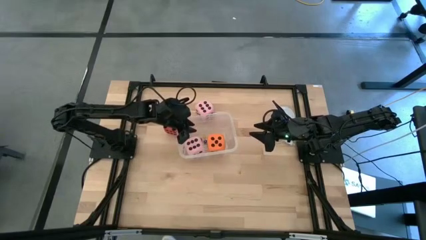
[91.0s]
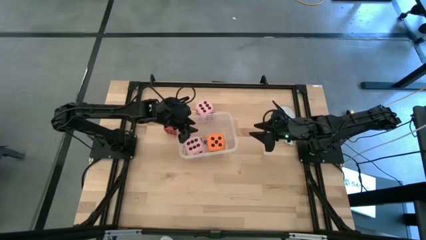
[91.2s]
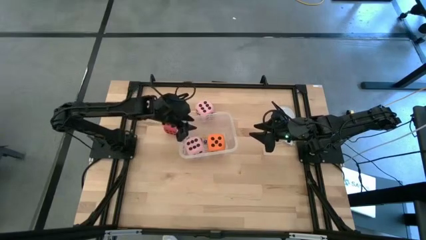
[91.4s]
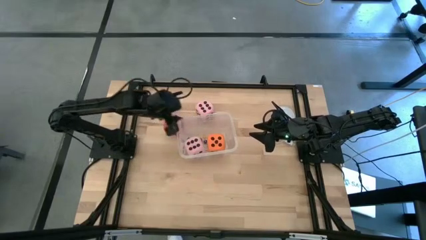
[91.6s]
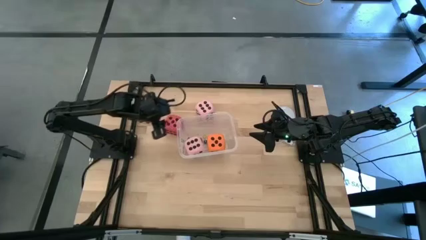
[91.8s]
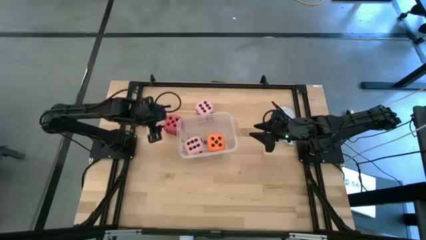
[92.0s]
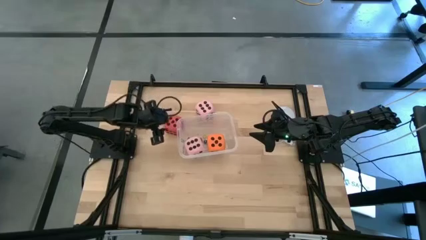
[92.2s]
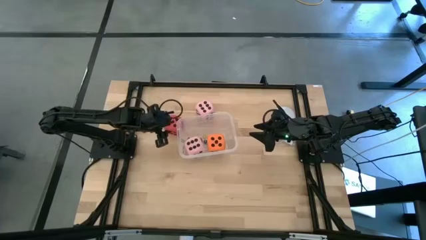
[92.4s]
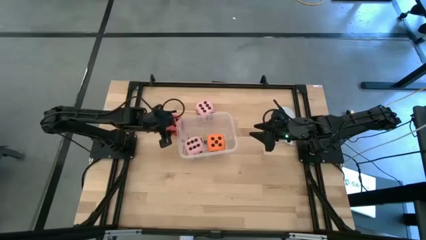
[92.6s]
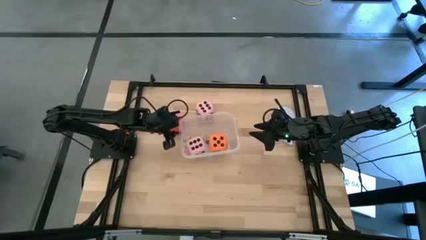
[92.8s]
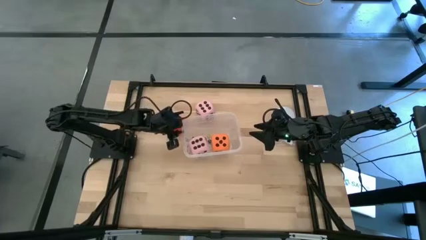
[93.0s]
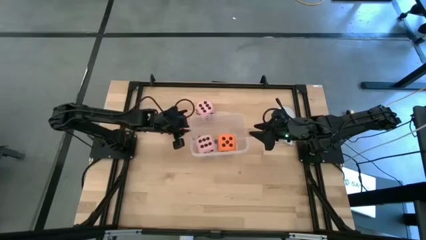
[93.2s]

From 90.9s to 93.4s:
Task: Pick & Place Dice
Adjust the transparent bin on the table

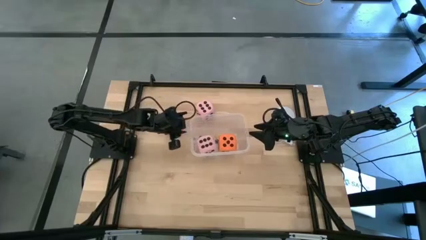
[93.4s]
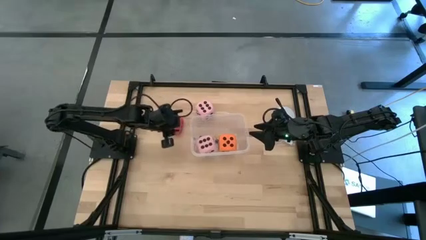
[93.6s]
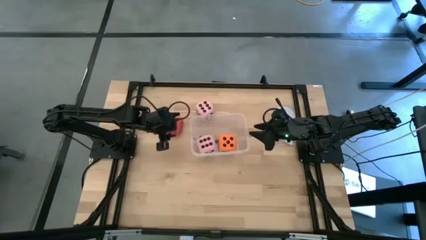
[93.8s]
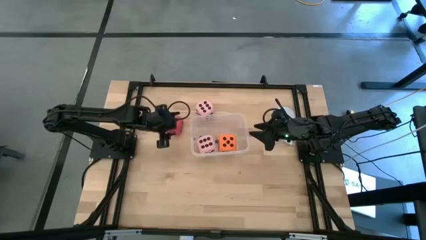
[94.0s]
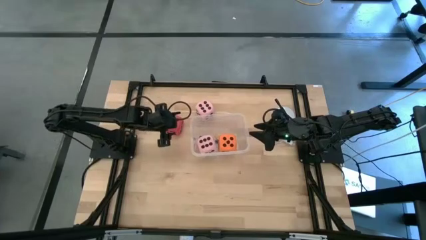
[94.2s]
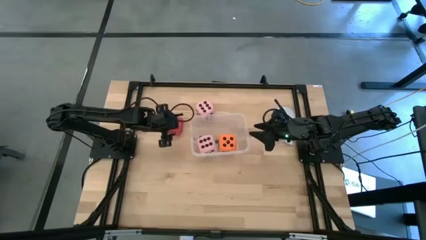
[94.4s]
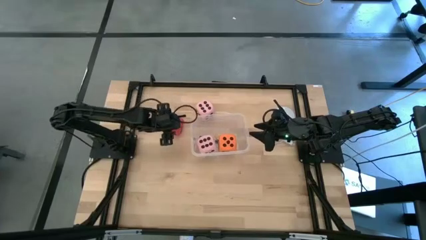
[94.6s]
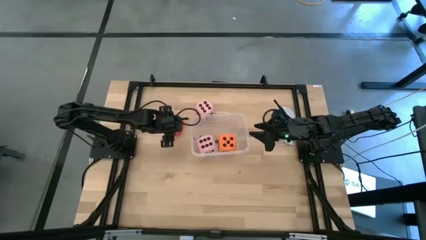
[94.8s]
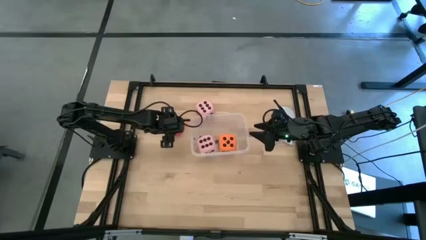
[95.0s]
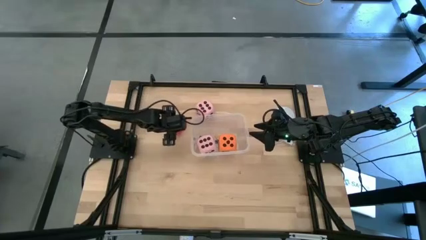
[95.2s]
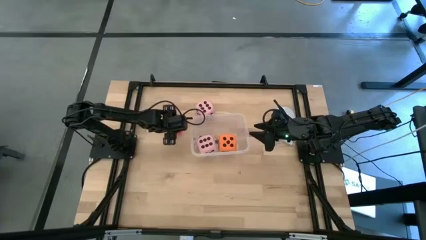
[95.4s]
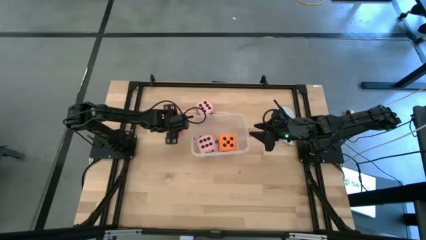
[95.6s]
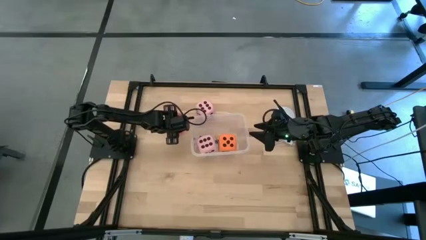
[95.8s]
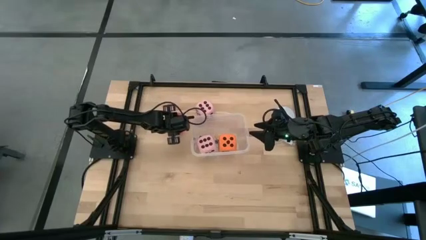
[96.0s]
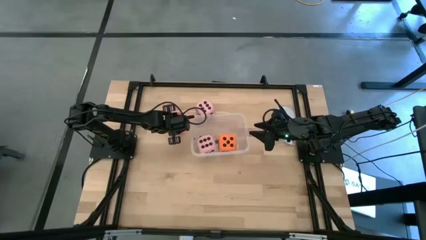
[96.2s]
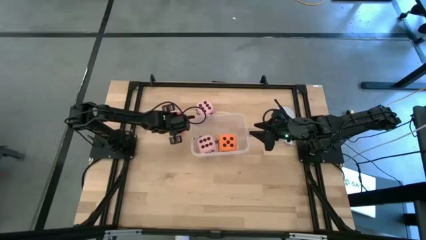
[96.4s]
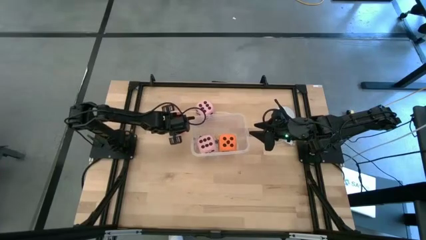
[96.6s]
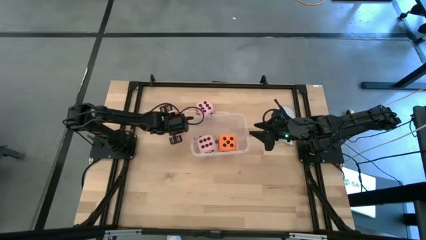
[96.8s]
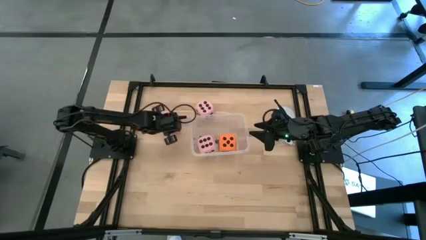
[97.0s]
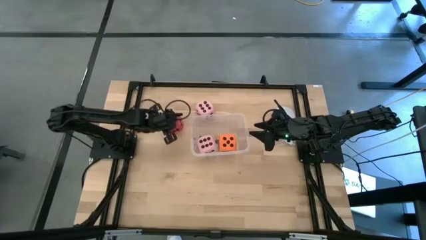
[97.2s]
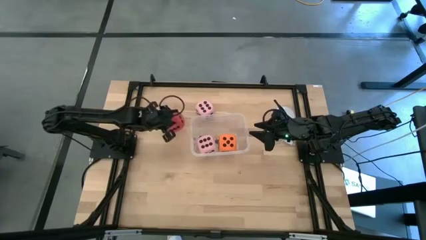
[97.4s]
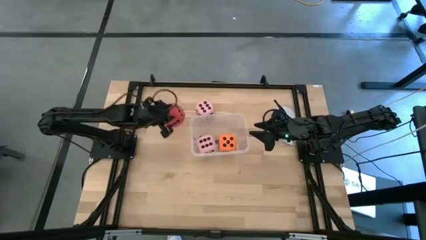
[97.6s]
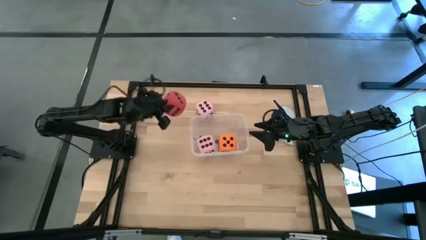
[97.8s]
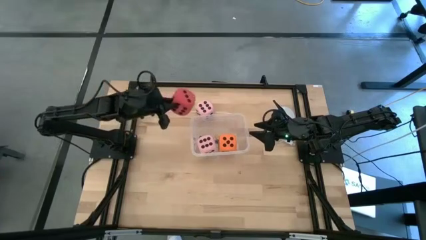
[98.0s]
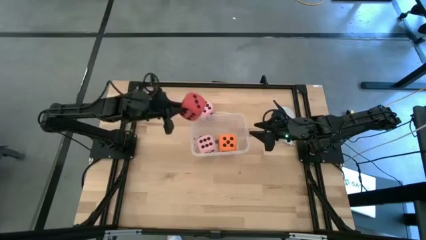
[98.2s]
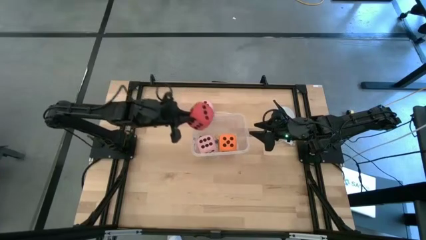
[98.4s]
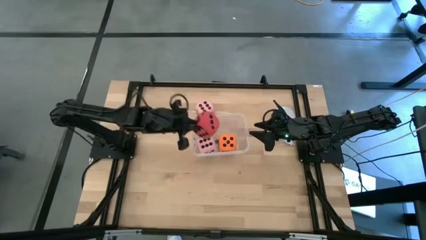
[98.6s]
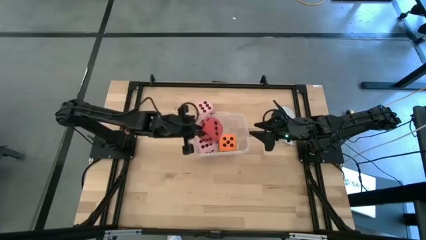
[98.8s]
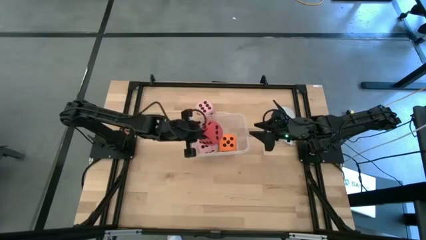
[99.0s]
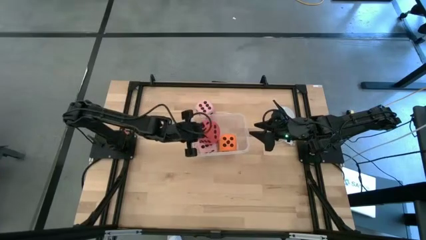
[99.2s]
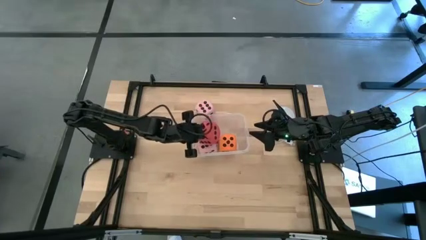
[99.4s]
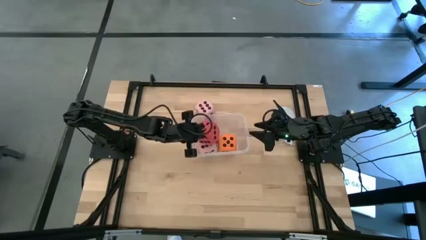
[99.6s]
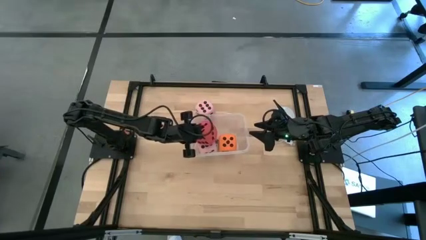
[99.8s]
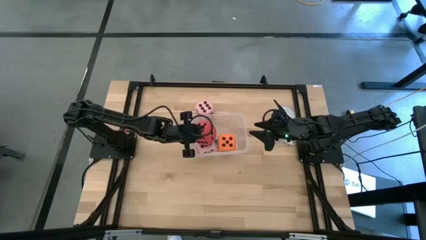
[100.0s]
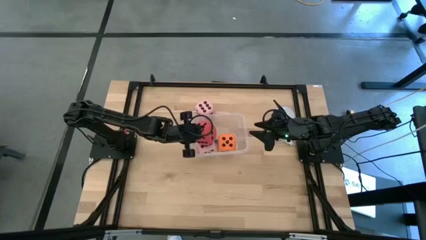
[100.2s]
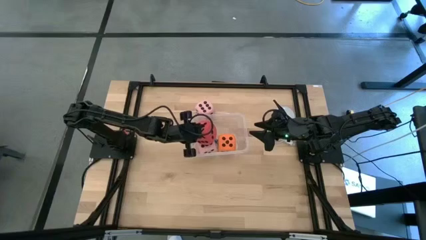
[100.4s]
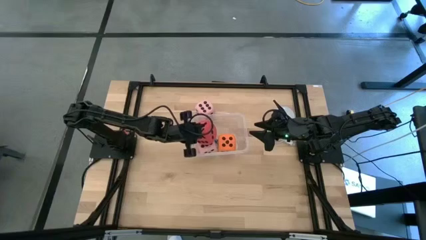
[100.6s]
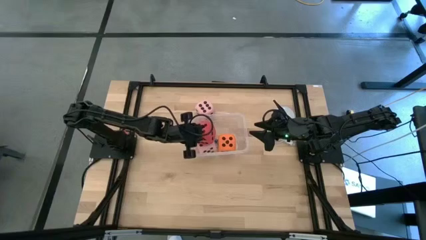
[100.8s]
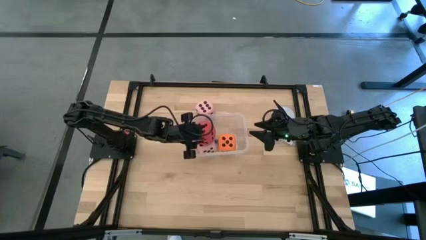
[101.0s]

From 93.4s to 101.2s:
Put the large red dice into the transparent bin

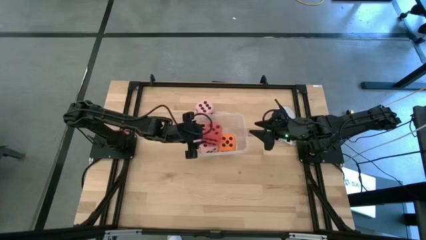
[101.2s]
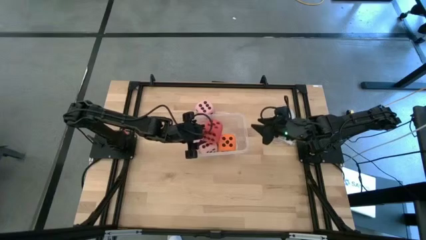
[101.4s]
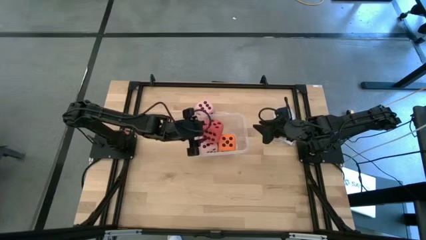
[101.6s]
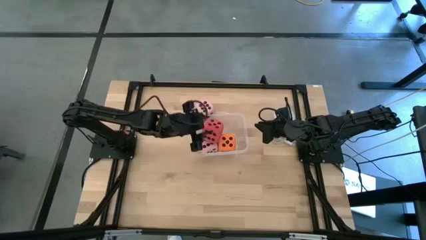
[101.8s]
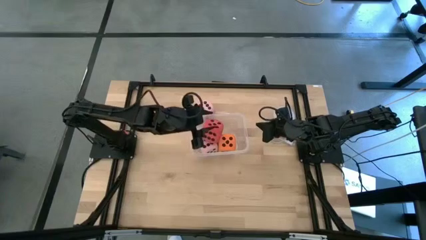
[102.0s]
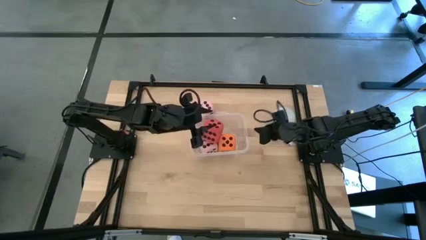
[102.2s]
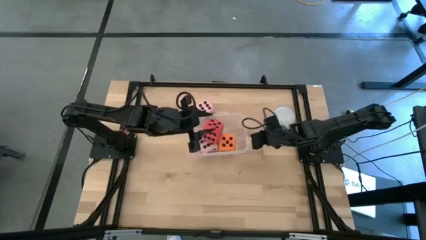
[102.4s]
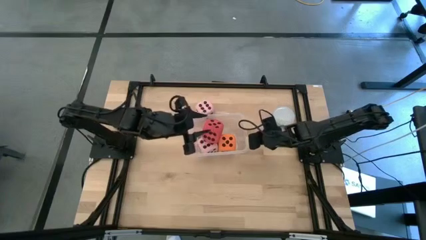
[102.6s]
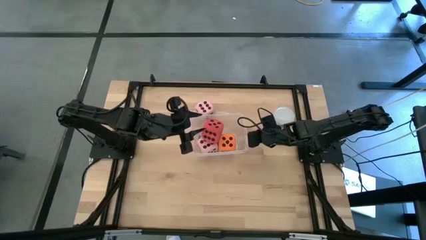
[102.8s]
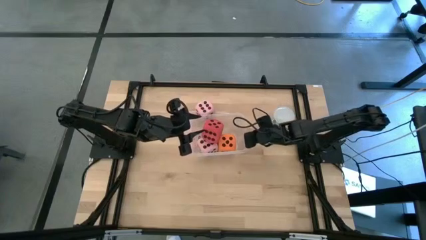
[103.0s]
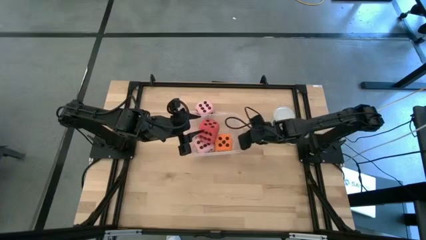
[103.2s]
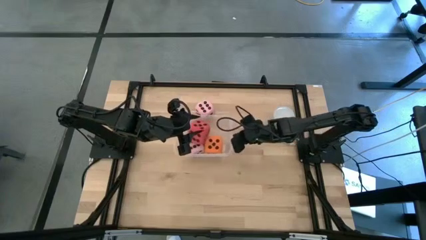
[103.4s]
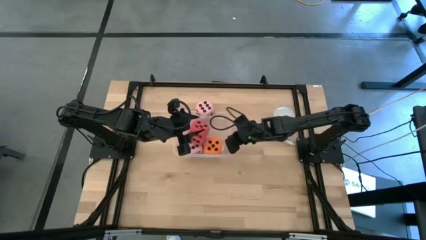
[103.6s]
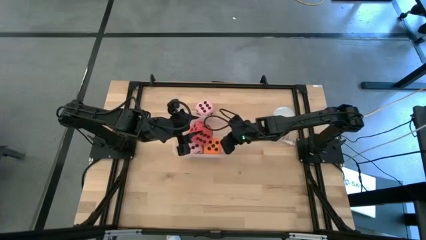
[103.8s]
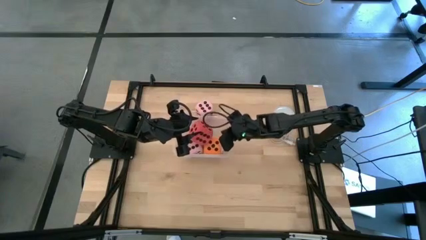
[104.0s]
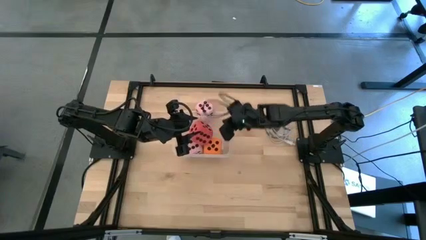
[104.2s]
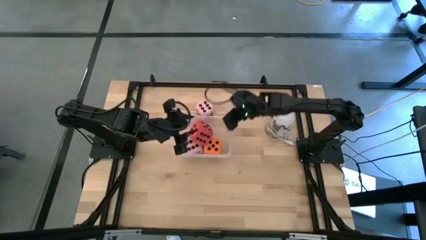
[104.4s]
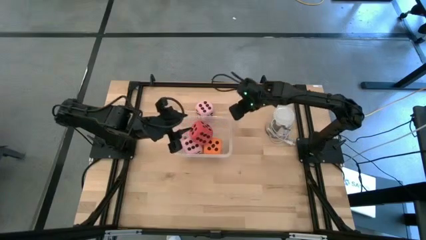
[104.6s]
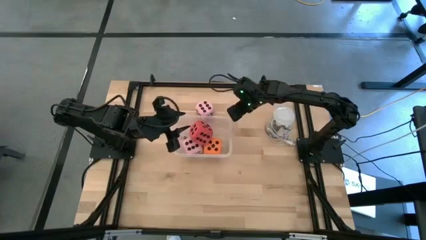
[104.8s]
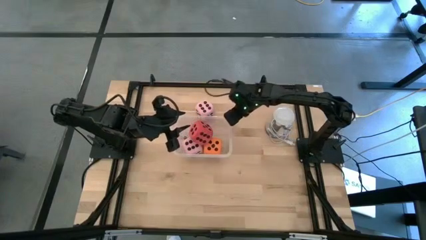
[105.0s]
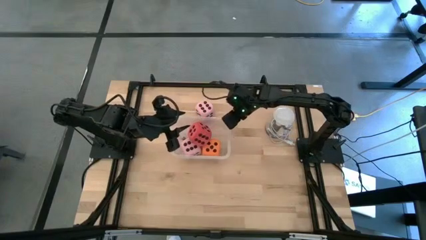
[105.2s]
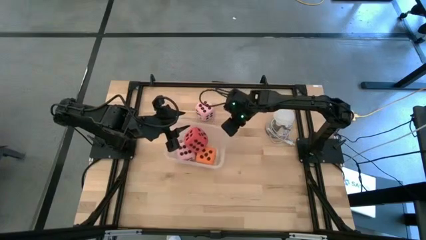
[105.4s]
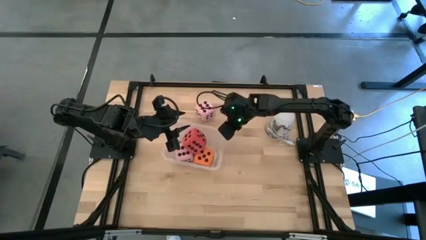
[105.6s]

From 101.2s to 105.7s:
Adjust the transparent bin on the table

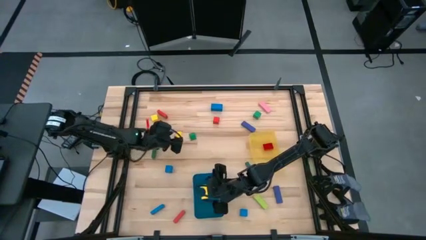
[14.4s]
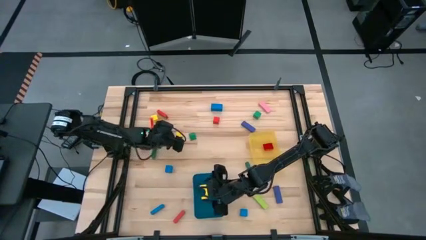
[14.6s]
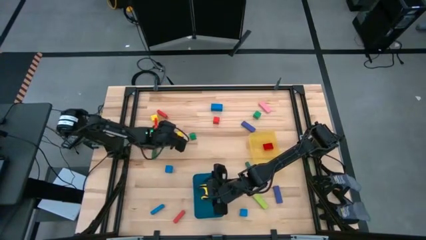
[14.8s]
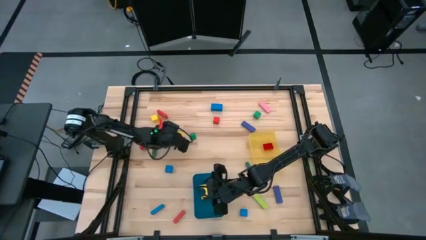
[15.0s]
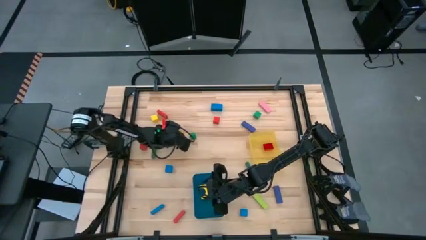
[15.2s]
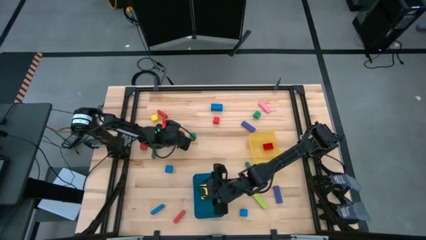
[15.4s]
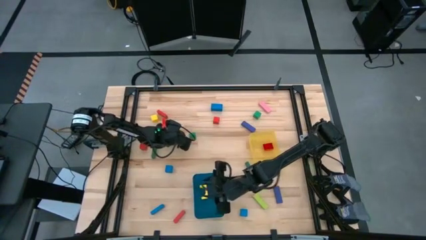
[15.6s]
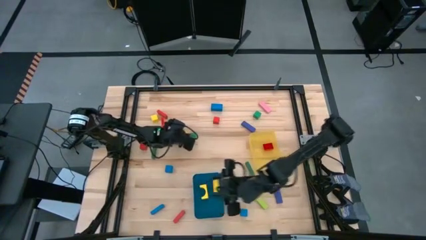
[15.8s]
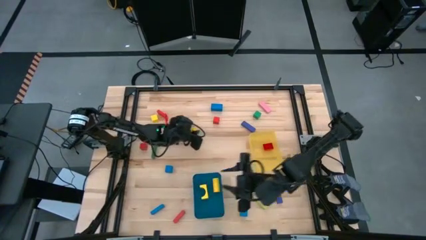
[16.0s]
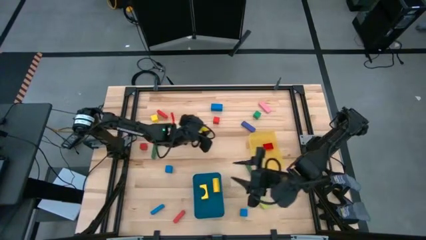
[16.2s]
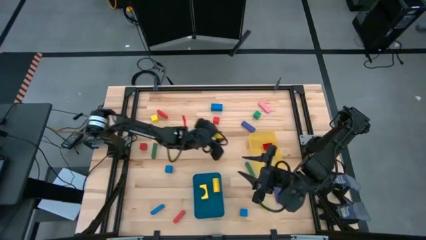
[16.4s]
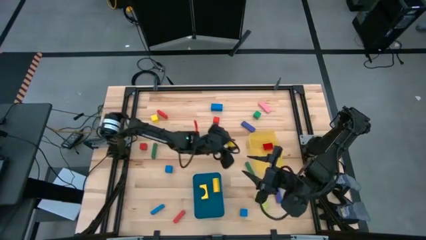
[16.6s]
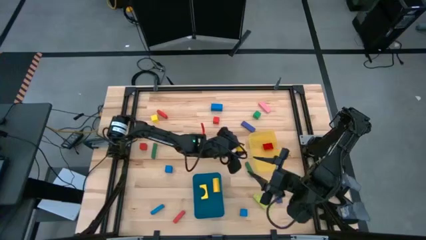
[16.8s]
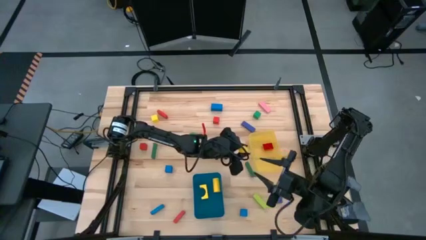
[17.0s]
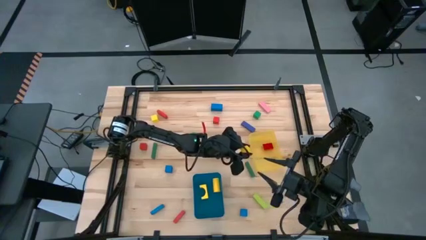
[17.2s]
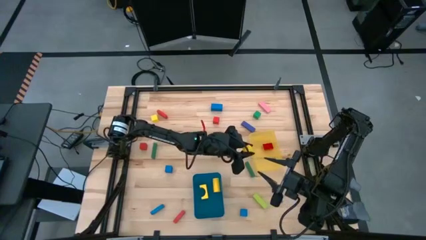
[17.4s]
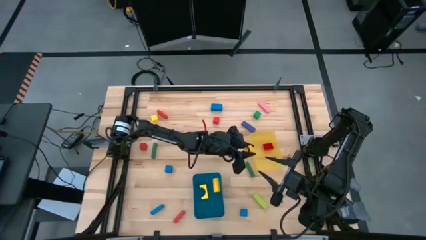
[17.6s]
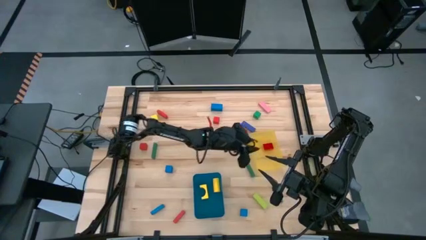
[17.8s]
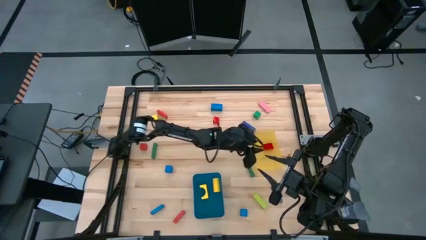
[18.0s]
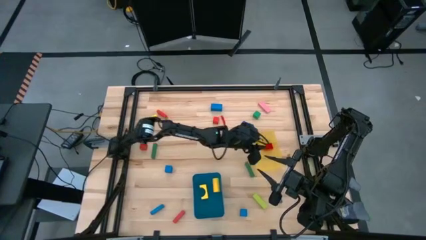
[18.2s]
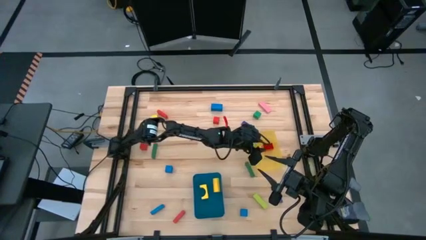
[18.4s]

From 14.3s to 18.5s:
Task: Sort blocks by size
Put the small yellow block into the yellow bin
